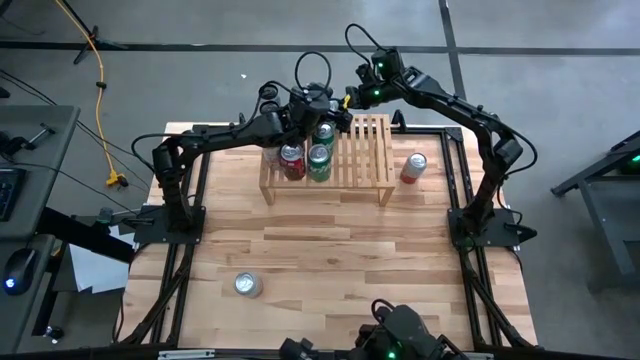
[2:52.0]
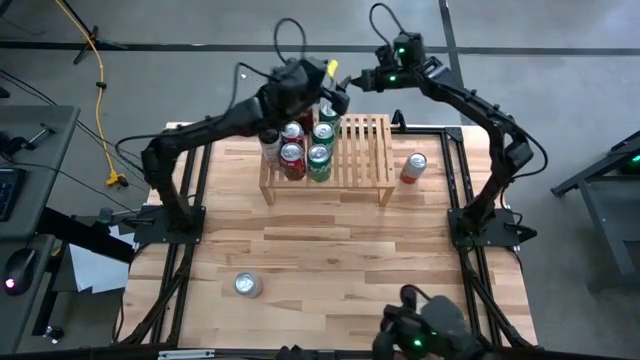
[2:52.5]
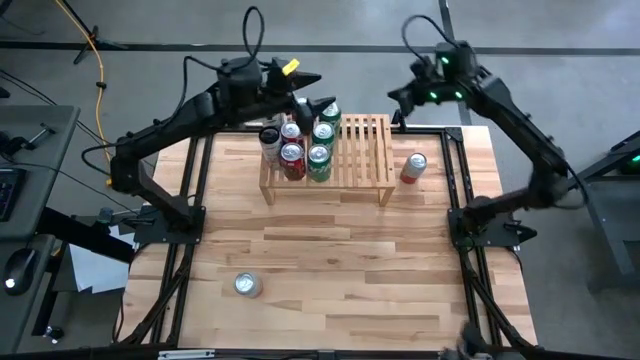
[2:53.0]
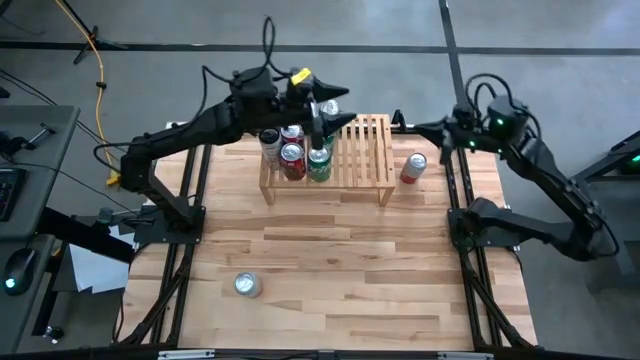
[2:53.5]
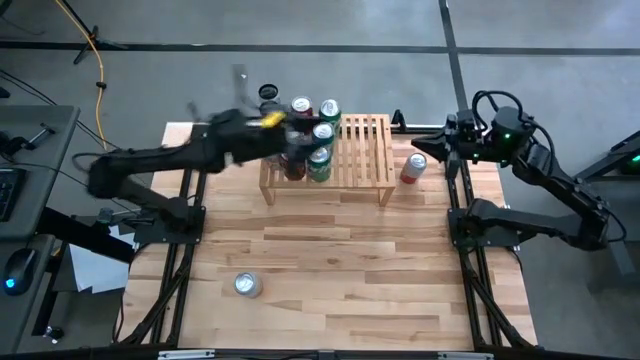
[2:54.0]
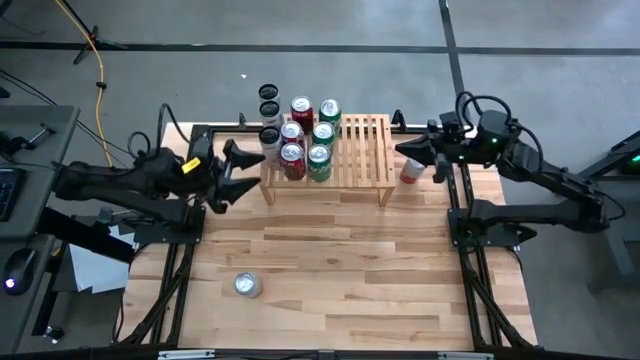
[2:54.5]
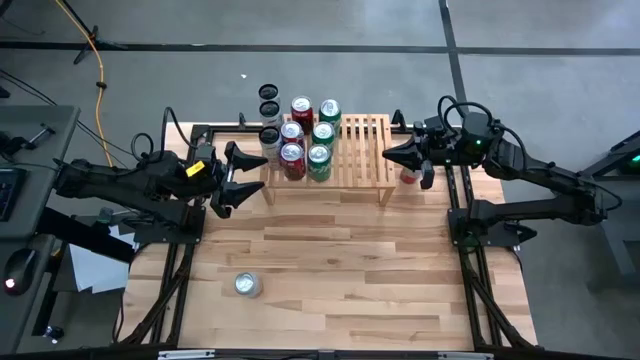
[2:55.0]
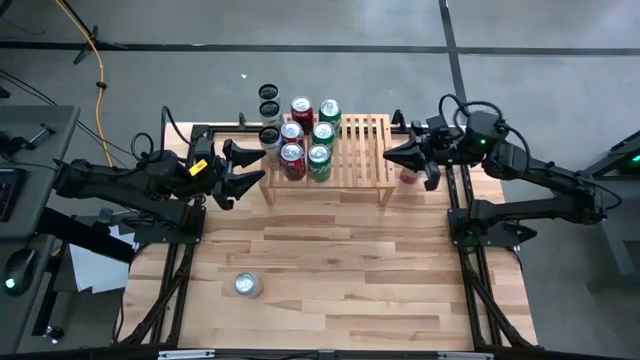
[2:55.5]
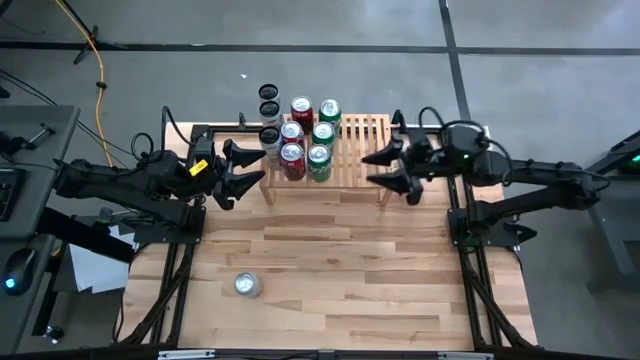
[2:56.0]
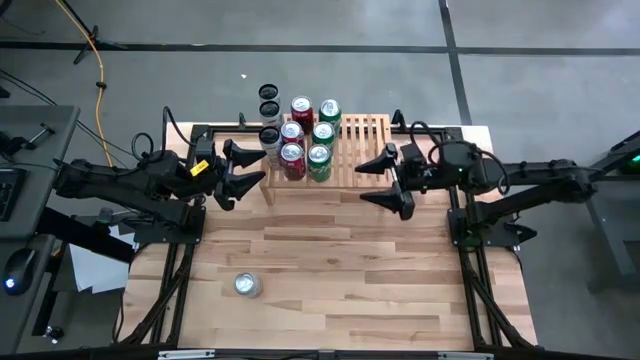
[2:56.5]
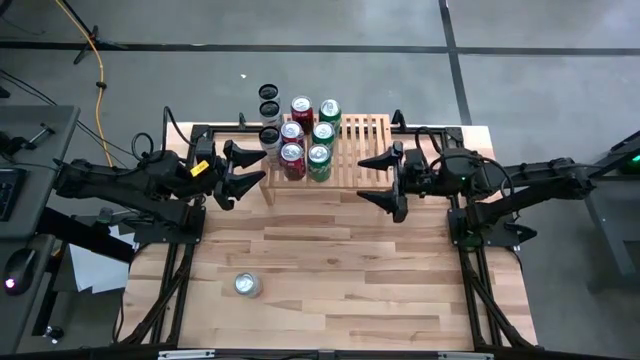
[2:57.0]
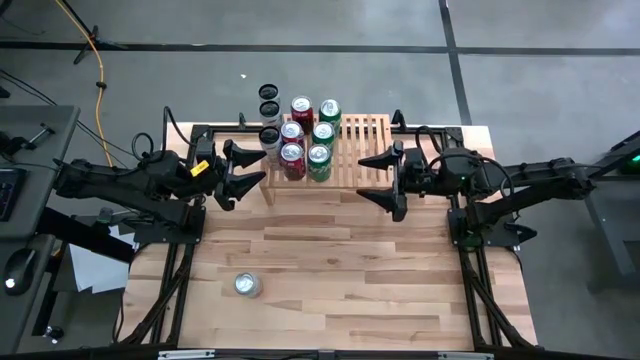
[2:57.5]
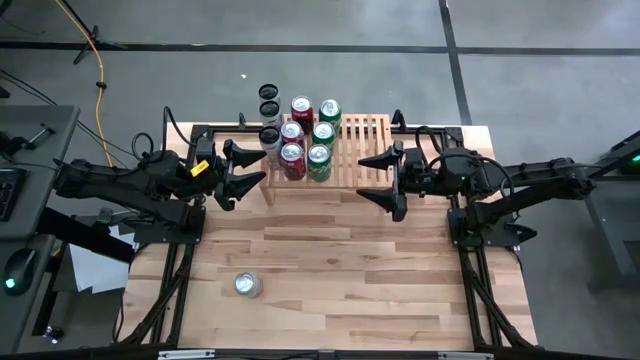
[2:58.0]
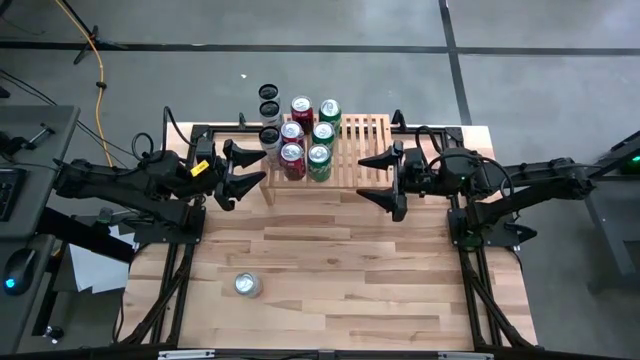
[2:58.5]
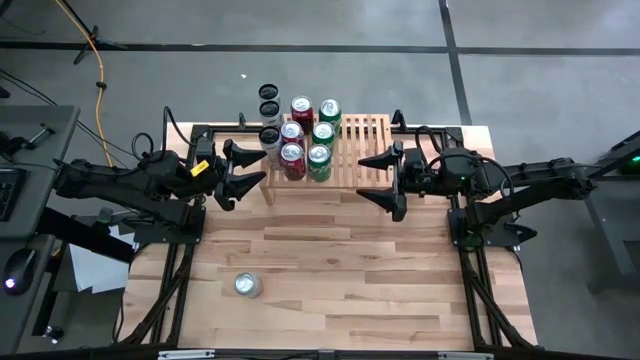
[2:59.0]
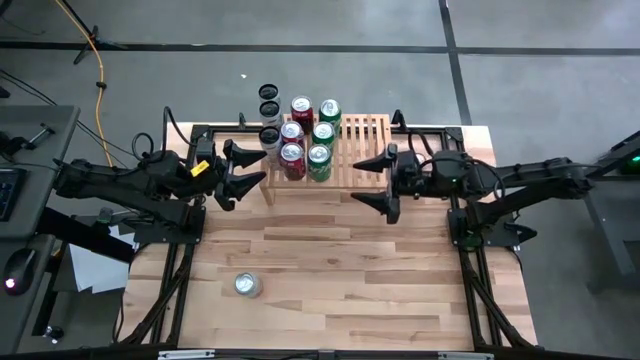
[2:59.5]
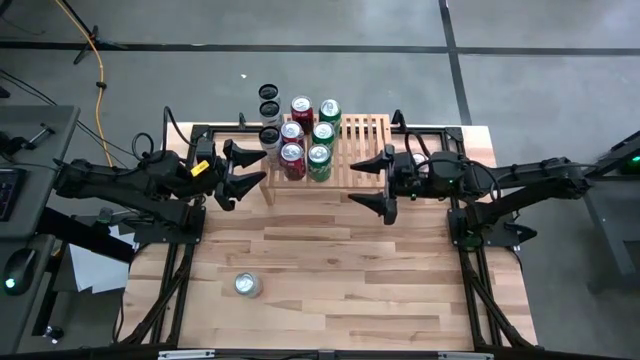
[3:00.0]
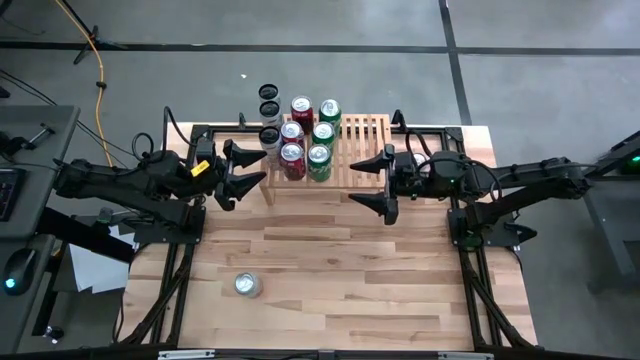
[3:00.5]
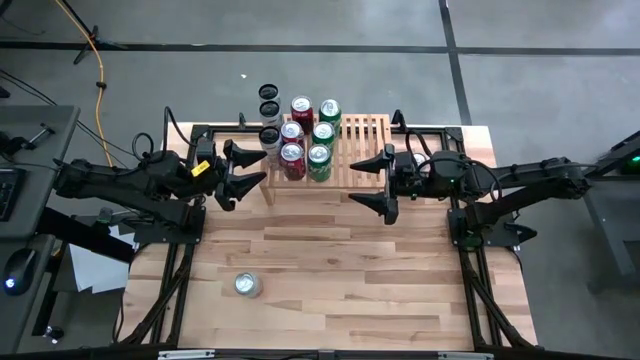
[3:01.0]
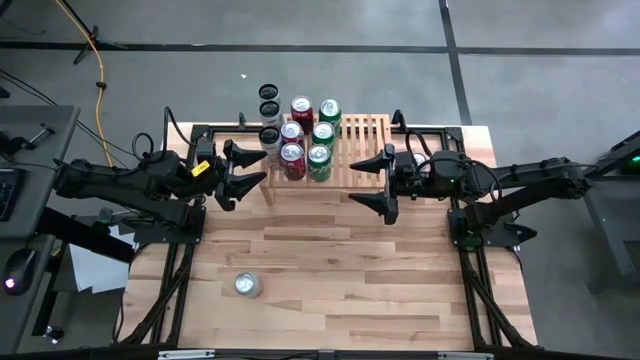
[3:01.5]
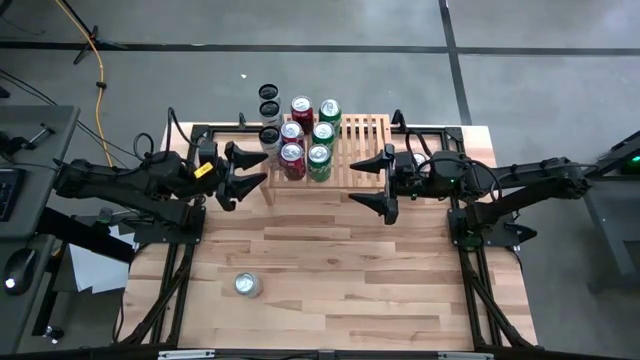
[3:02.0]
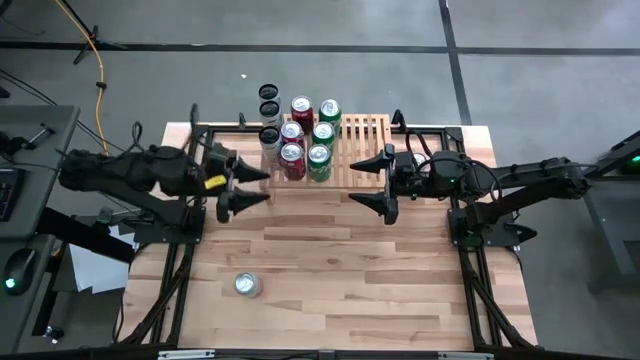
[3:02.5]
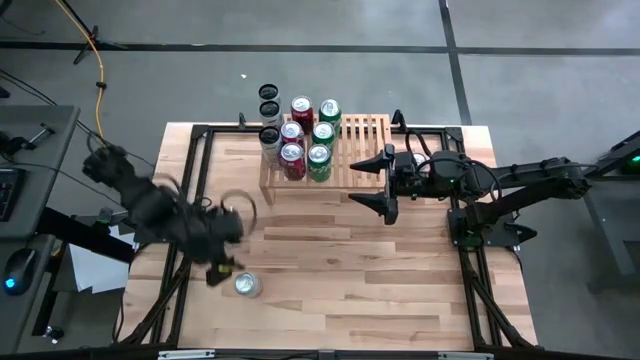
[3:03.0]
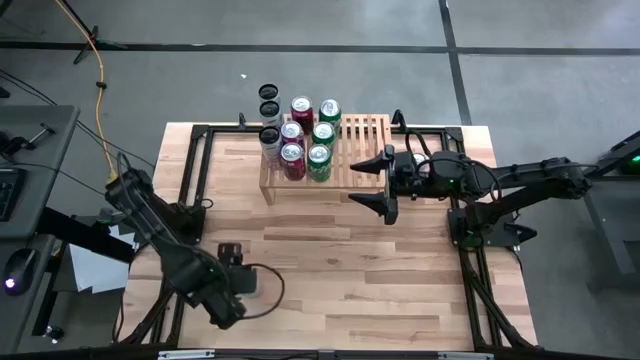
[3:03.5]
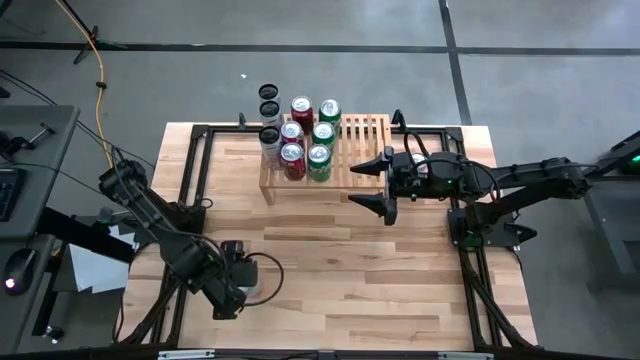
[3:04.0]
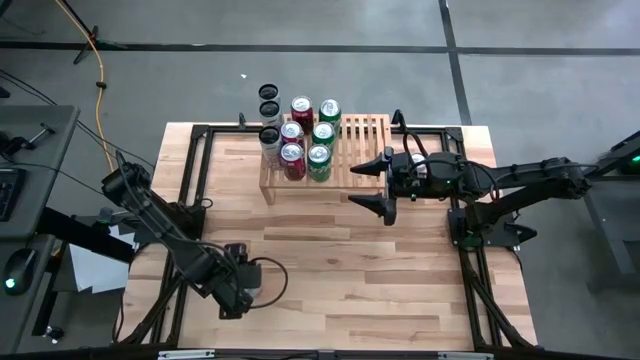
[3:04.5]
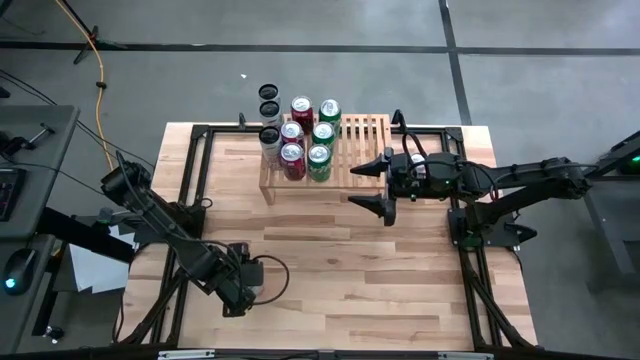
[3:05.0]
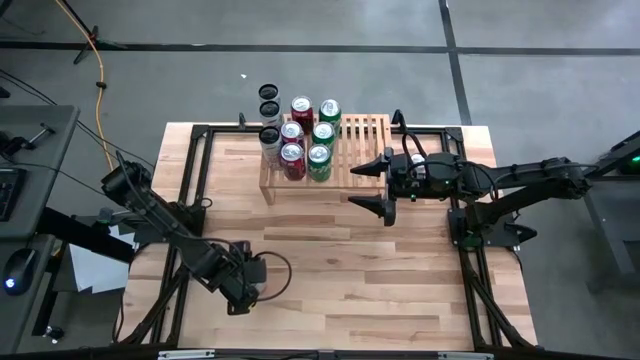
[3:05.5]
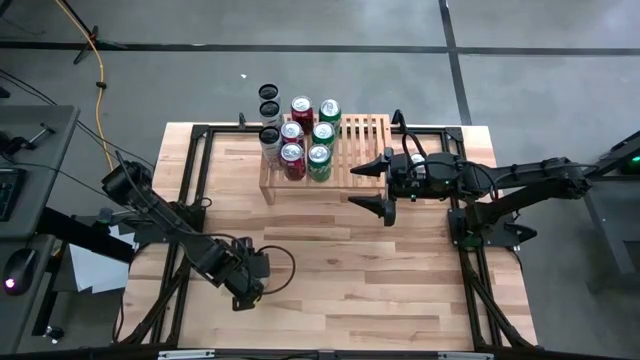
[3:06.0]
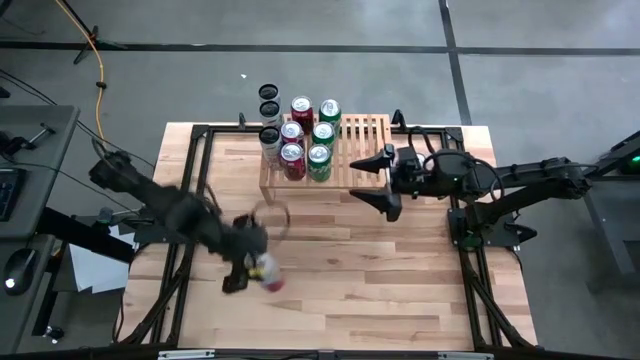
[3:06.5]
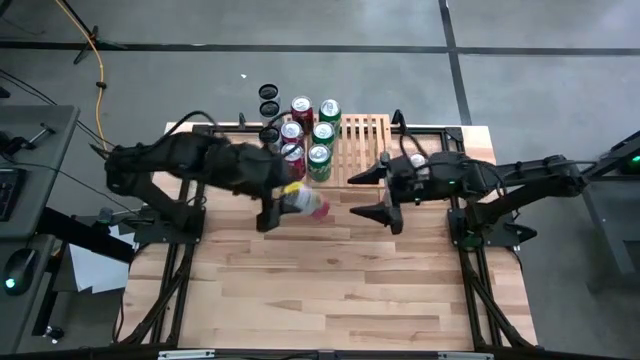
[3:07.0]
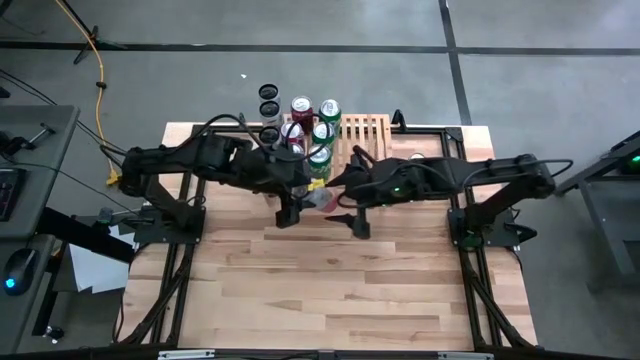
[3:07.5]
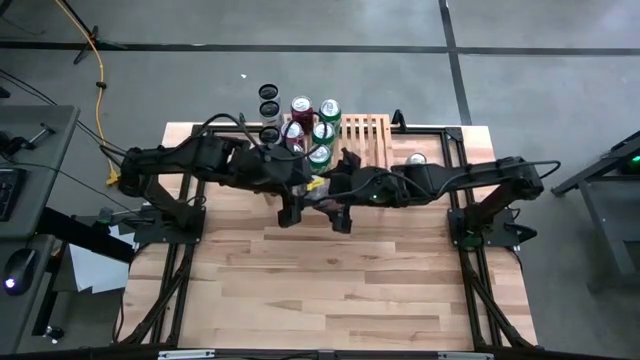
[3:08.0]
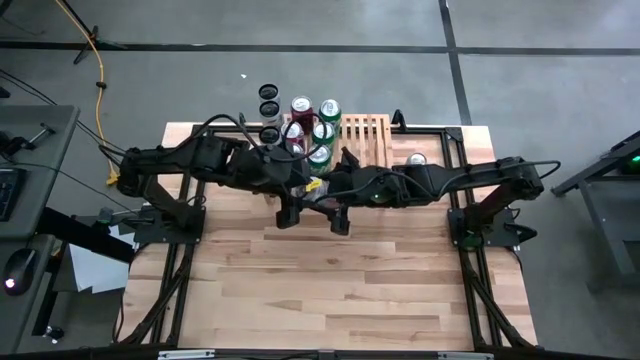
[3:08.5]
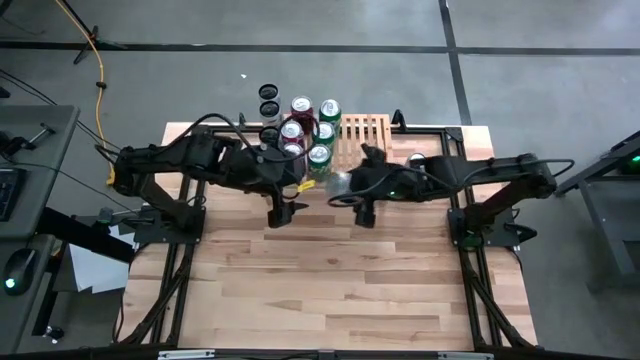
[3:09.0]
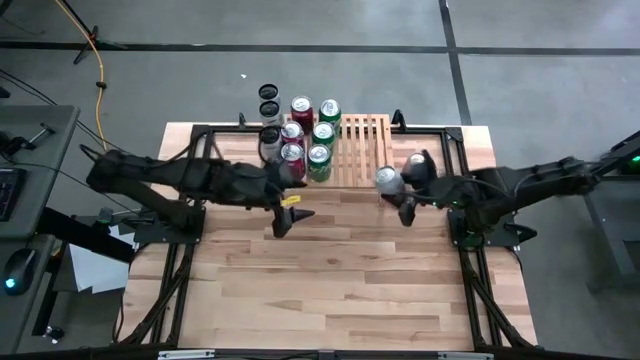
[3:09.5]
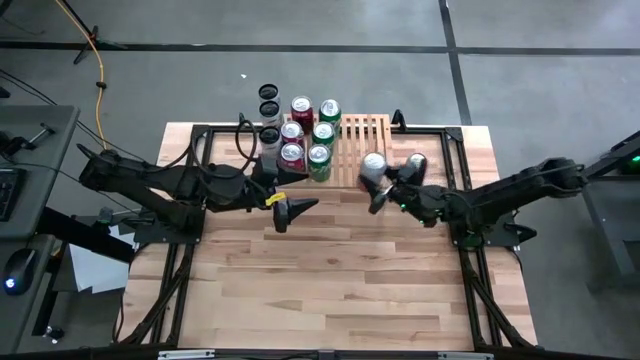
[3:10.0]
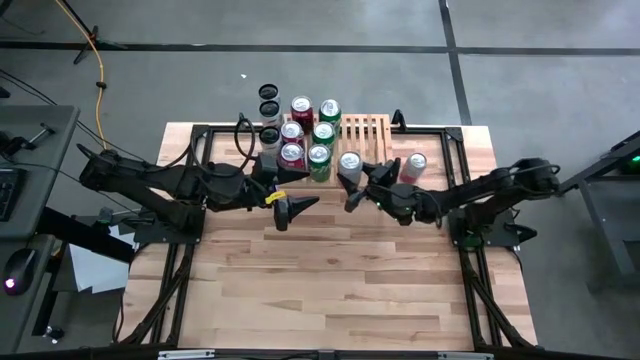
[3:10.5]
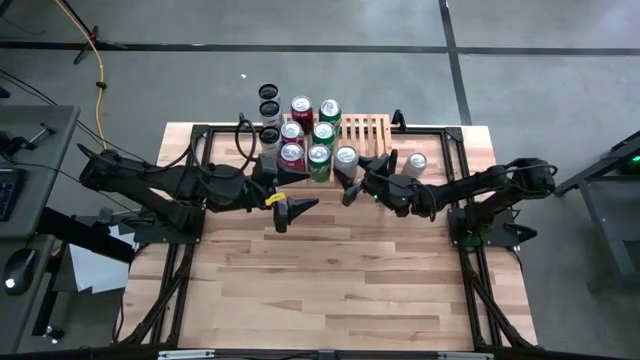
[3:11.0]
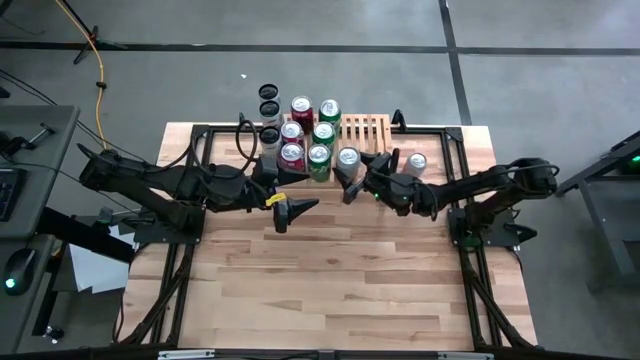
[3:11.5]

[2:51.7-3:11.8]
Task: Place canned beverage on shelf
Put the bottom pink-white soda can on the shelf

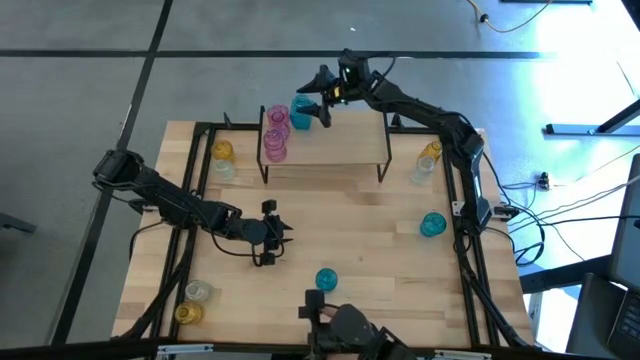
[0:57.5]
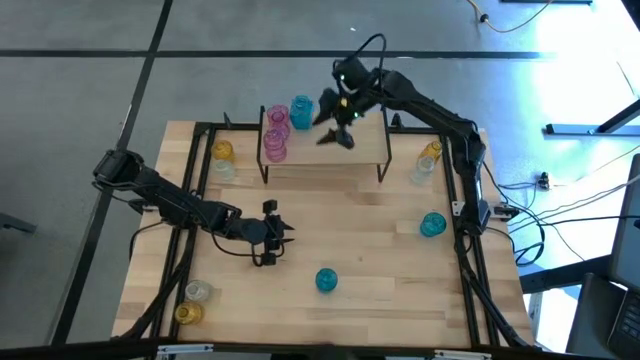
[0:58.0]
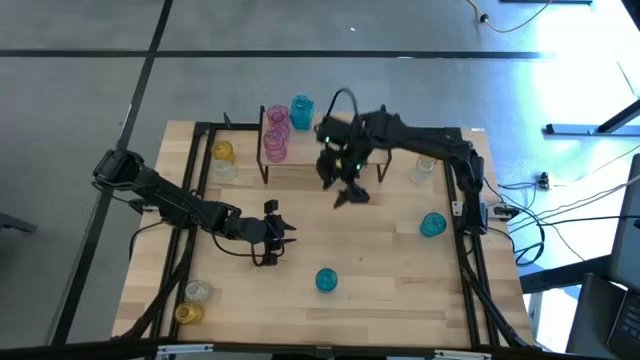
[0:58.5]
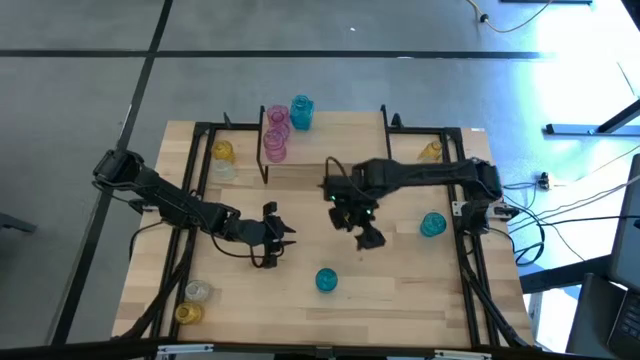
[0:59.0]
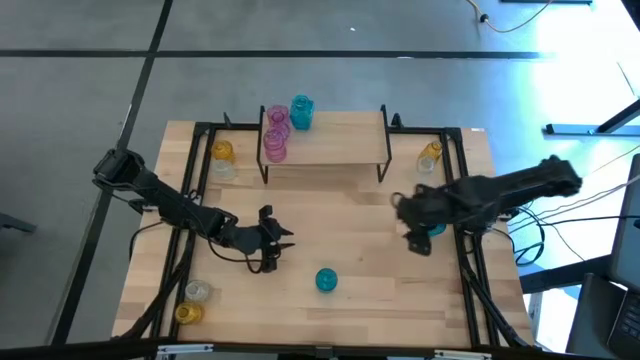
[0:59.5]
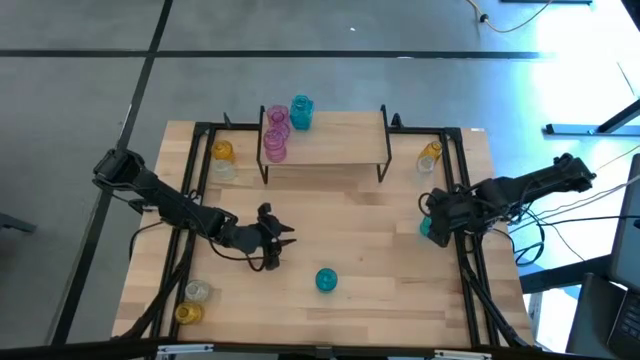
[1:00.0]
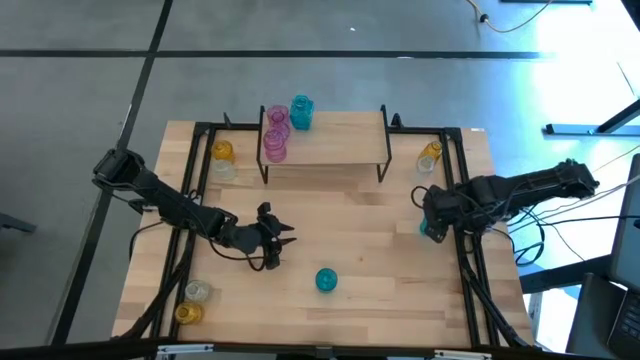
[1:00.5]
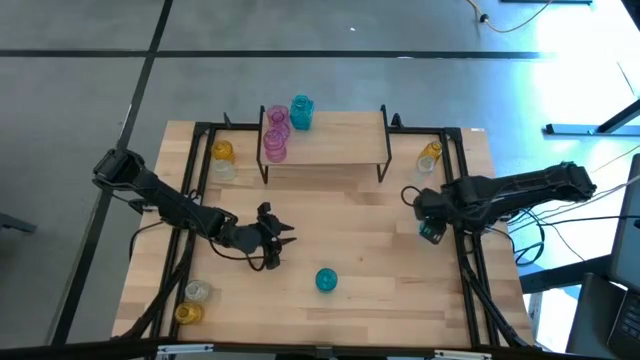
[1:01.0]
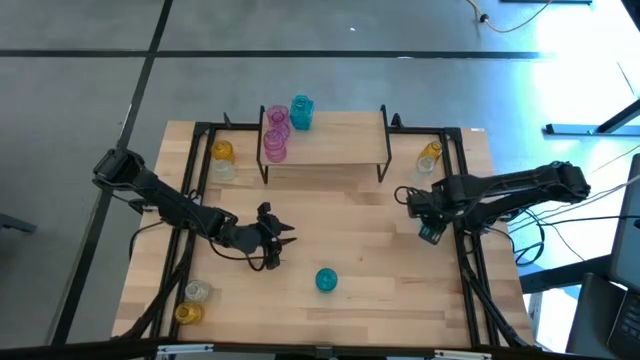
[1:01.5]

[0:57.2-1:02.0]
Task: sort vases onto shelf
Put the right blue flower vase on the shelf aligned with the other blue flower vase
